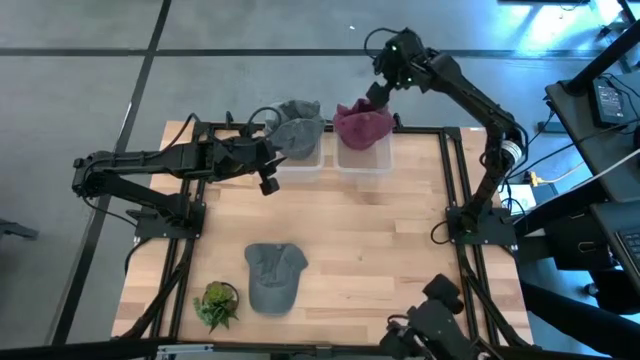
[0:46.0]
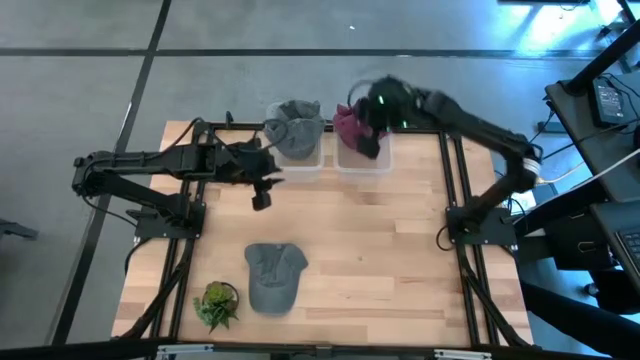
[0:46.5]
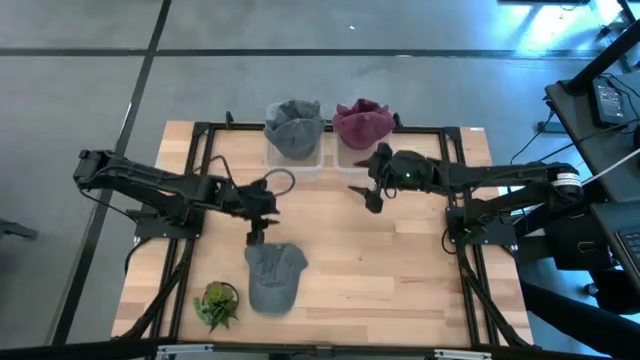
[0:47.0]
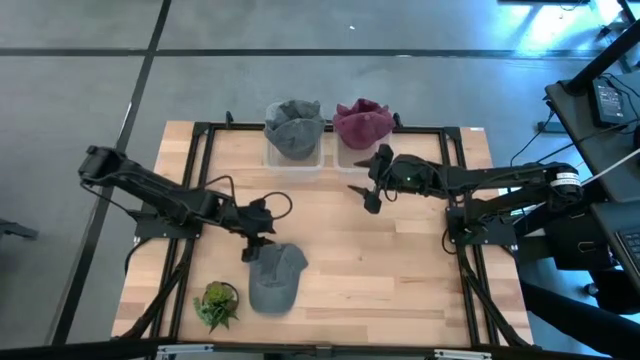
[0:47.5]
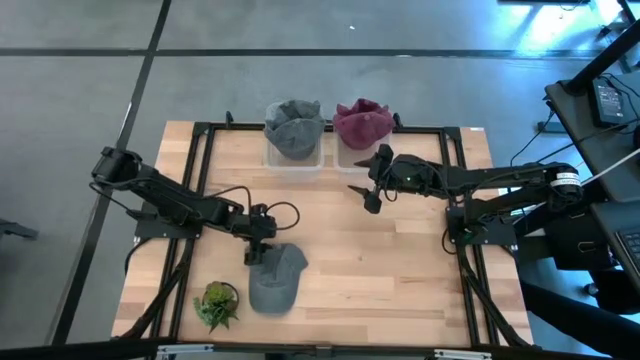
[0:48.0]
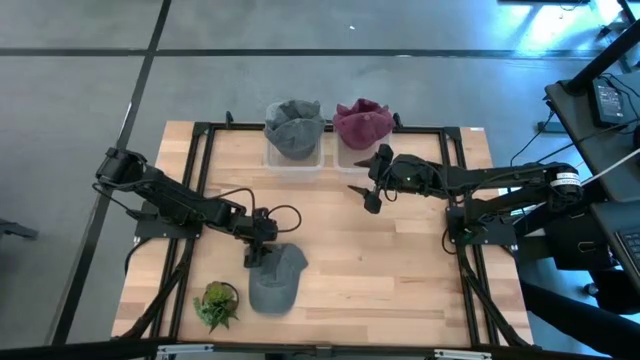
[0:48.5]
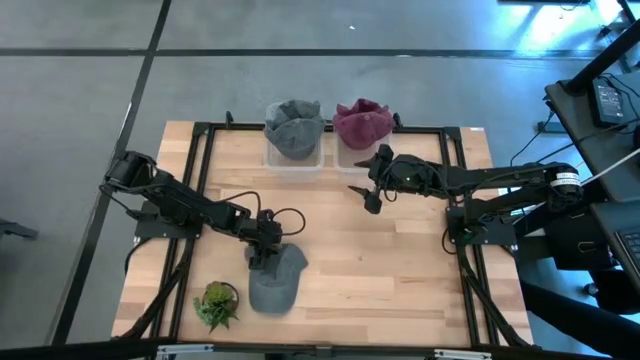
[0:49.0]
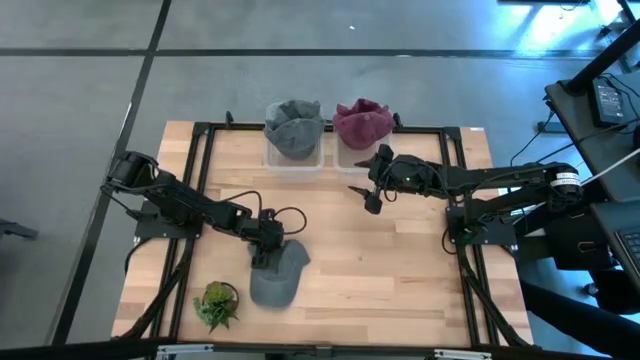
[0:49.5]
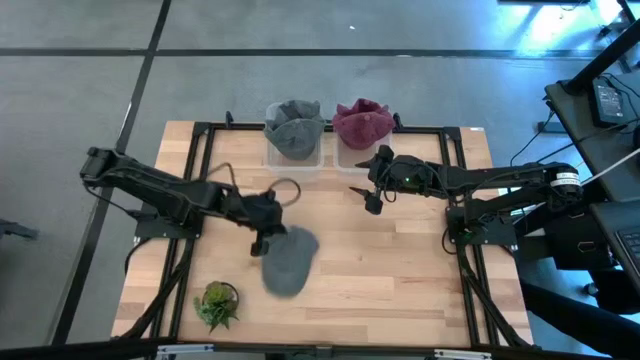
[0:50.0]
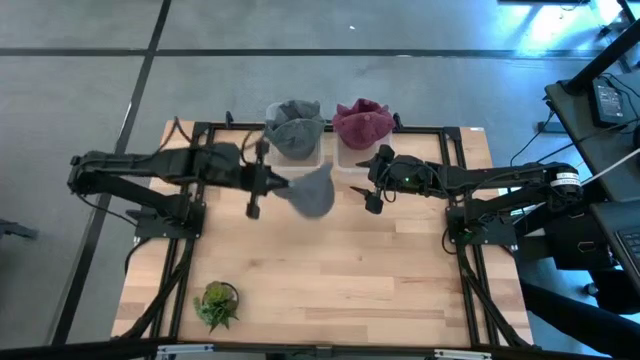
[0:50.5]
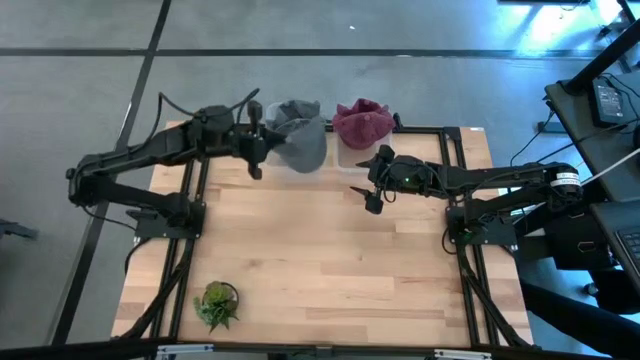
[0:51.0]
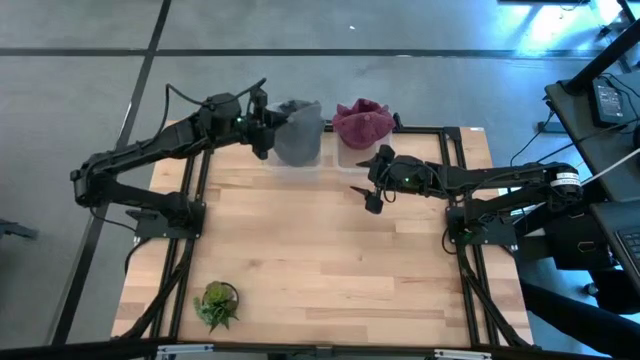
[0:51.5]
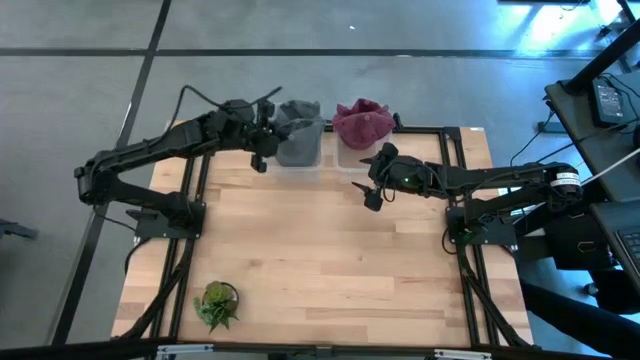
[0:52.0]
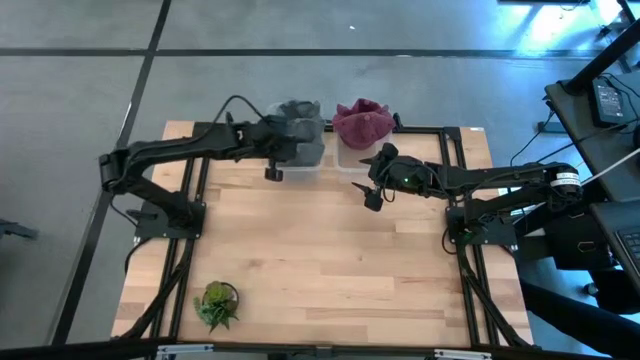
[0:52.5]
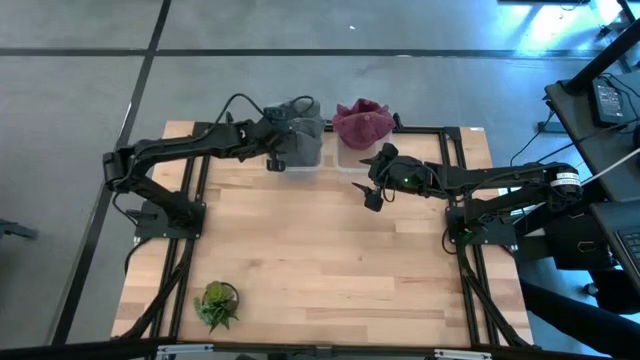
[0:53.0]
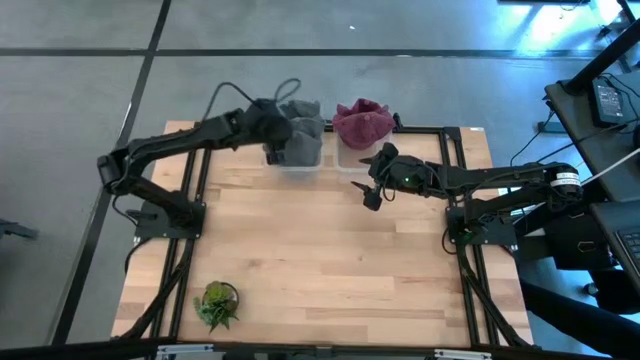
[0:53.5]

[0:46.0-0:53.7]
Task: Pick & Place hat
Put the gray cap into the left transparent bin

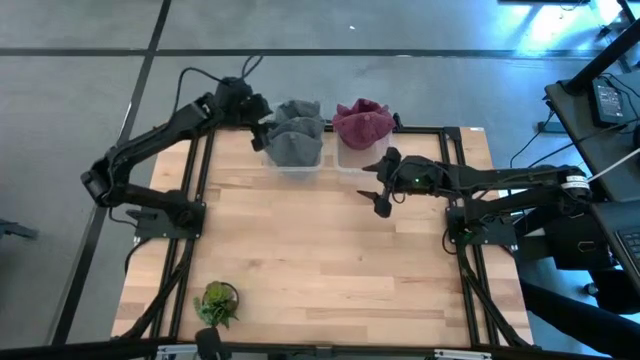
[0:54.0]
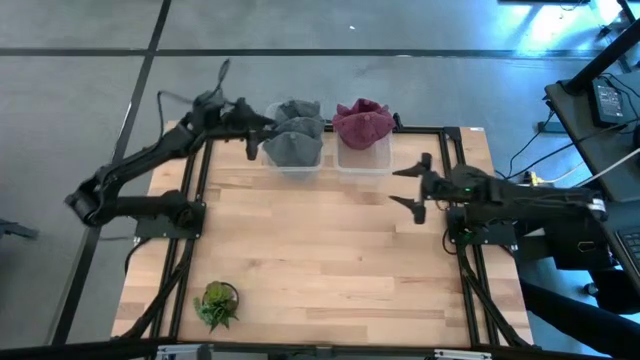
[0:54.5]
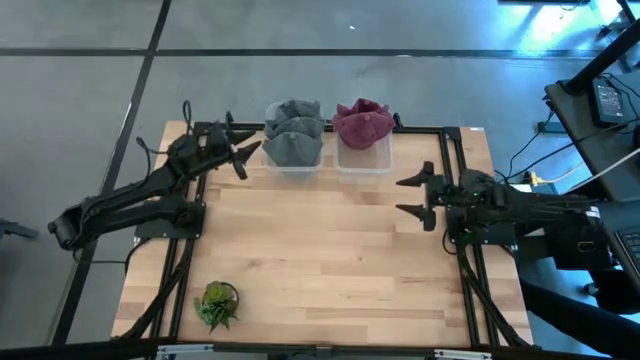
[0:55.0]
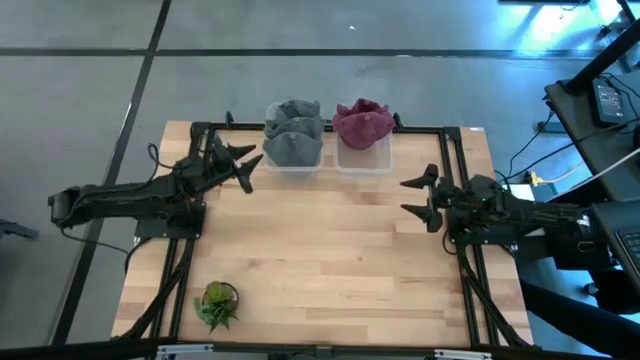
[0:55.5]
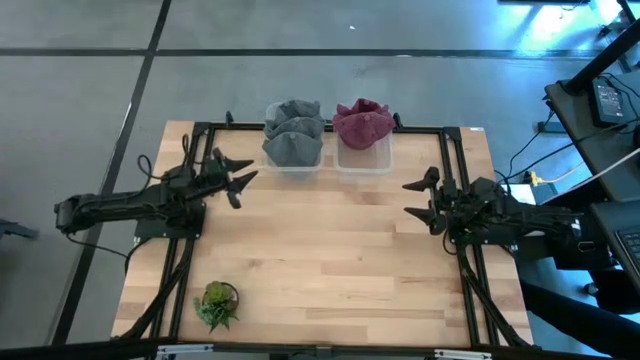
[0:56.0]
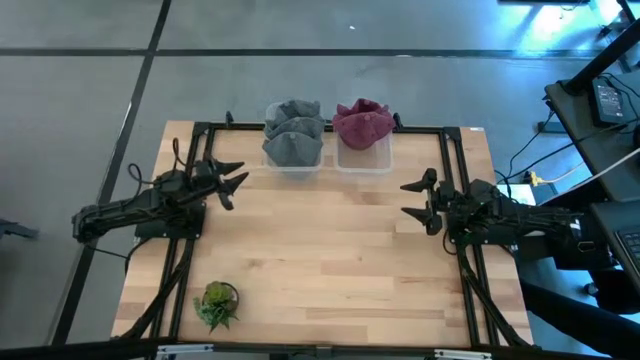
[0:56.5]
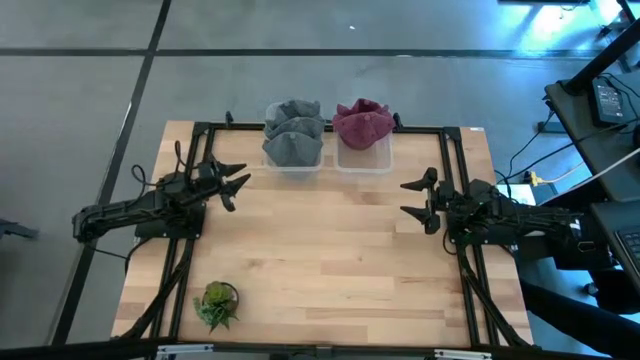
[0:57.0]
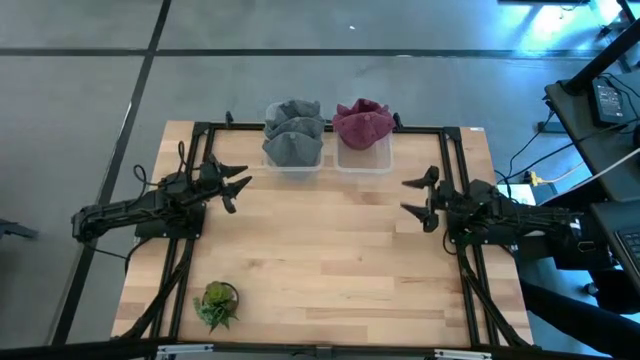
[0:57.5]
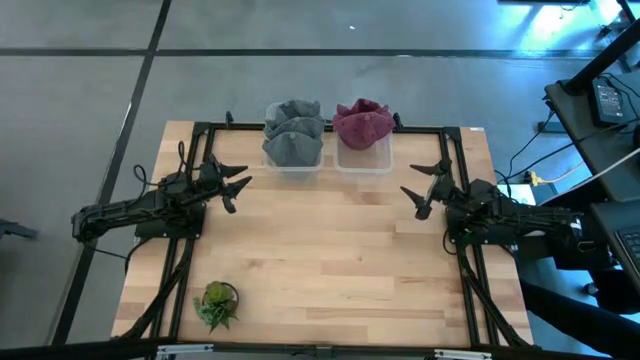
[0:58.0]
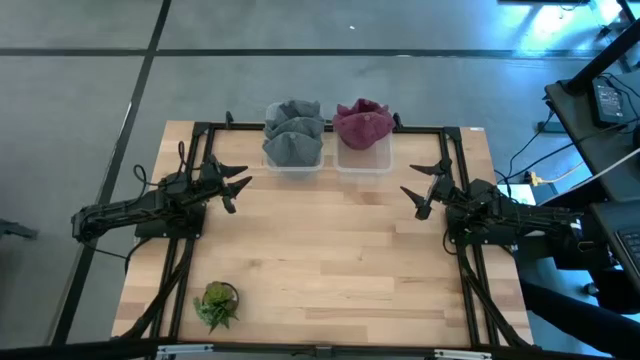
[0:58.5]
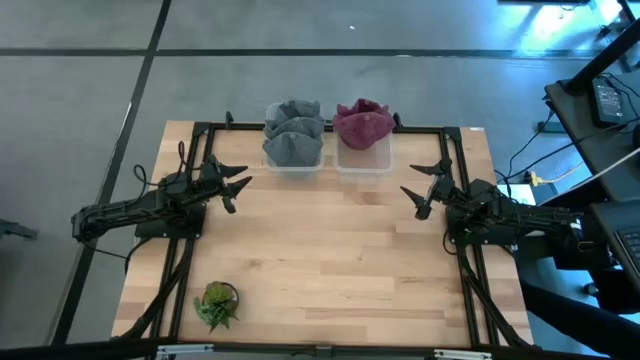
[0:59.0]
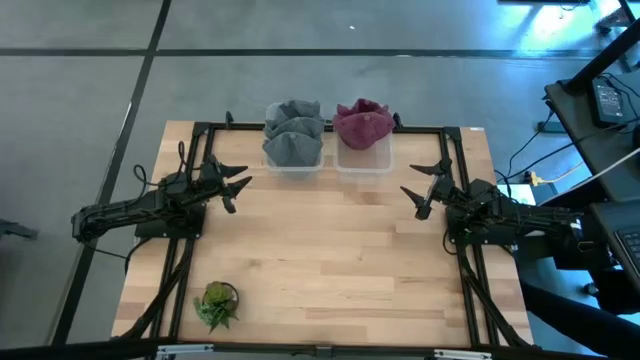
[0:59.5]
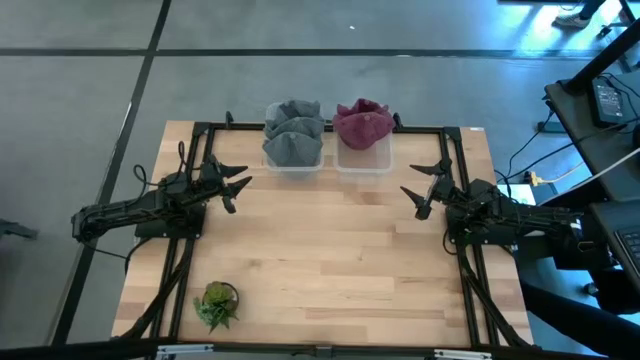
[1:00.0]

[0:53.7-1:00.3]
Return to Home Position

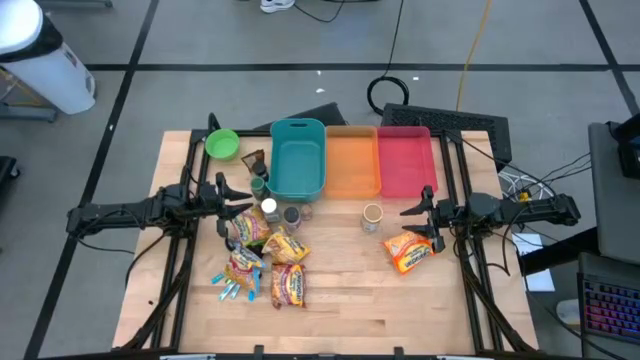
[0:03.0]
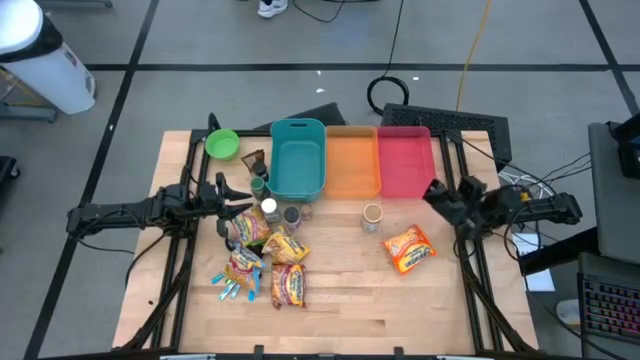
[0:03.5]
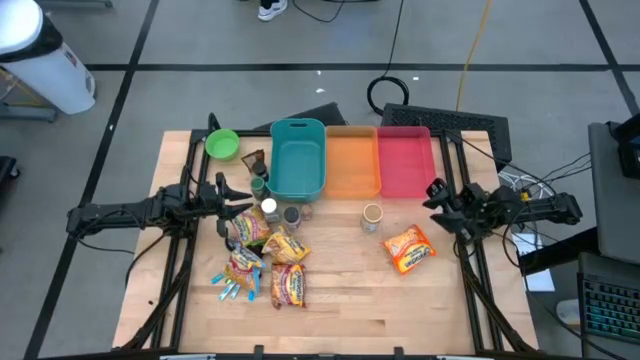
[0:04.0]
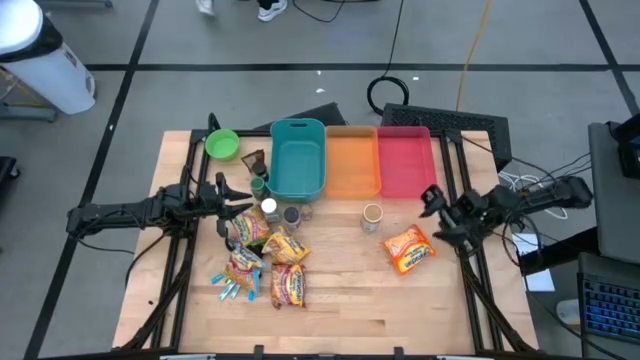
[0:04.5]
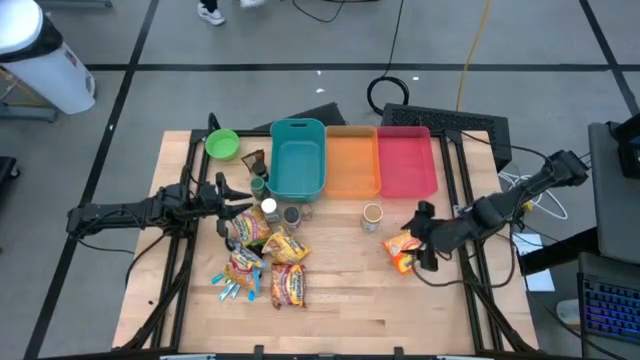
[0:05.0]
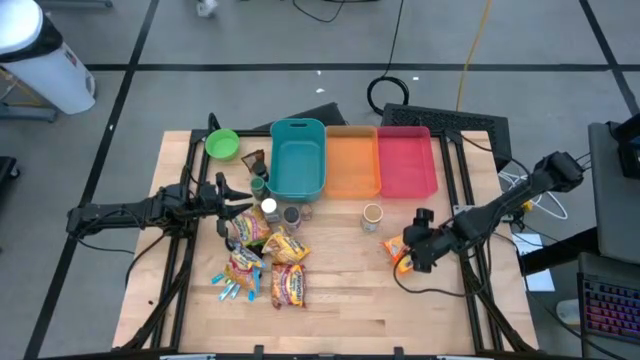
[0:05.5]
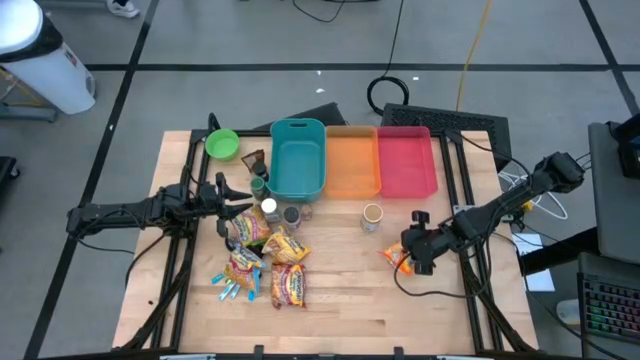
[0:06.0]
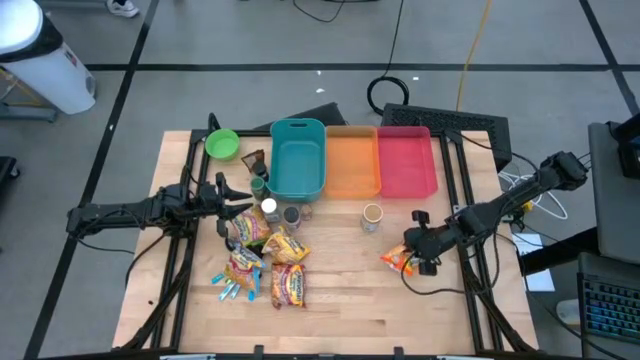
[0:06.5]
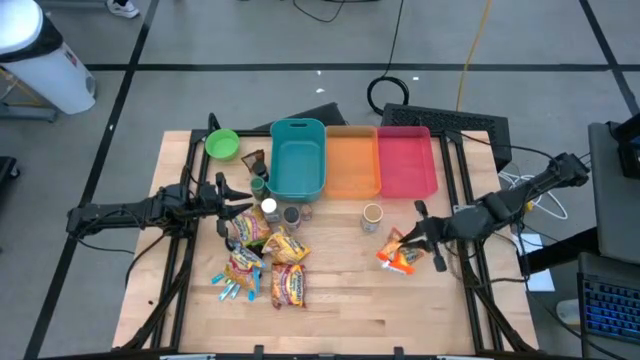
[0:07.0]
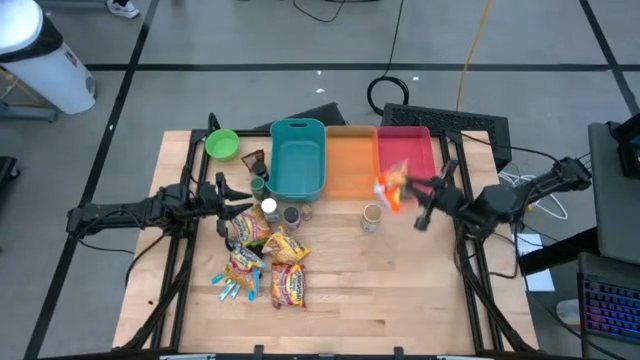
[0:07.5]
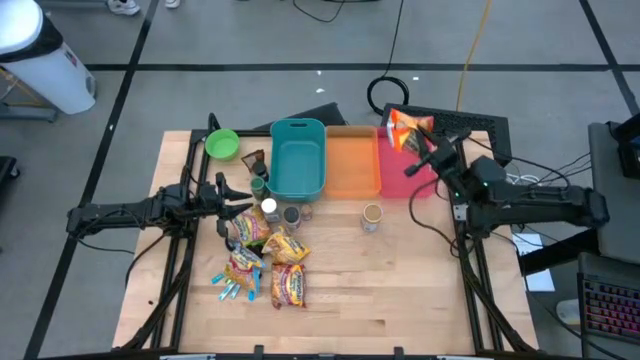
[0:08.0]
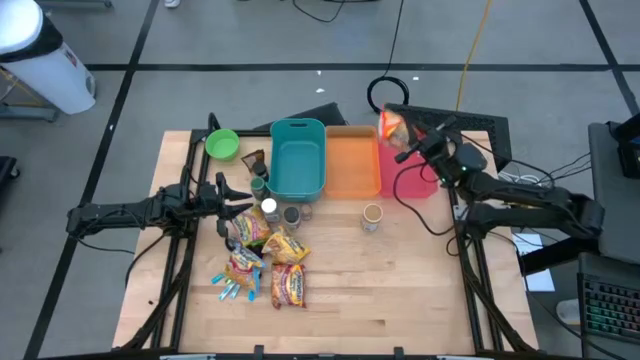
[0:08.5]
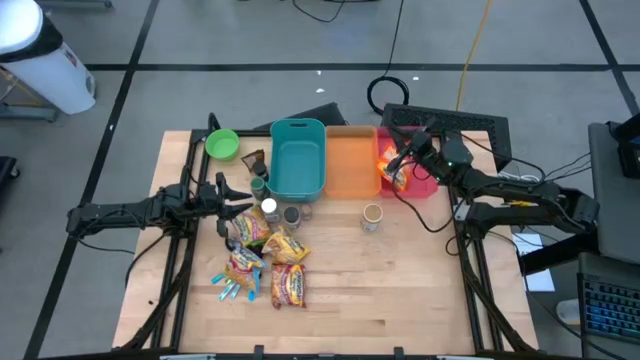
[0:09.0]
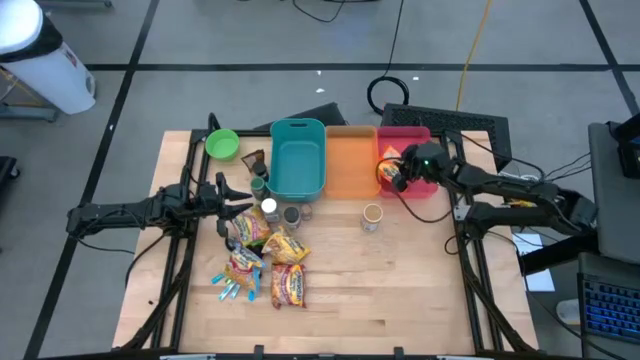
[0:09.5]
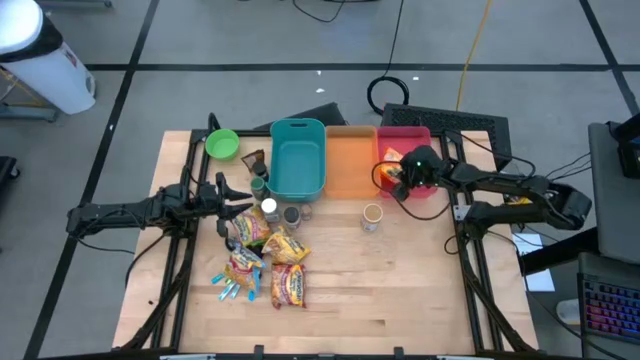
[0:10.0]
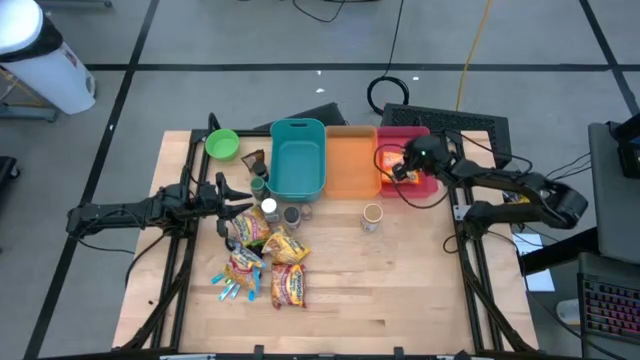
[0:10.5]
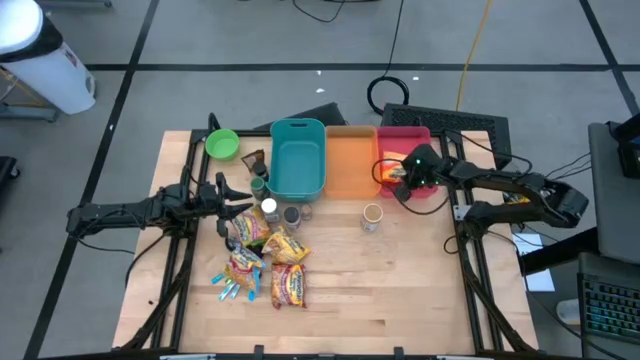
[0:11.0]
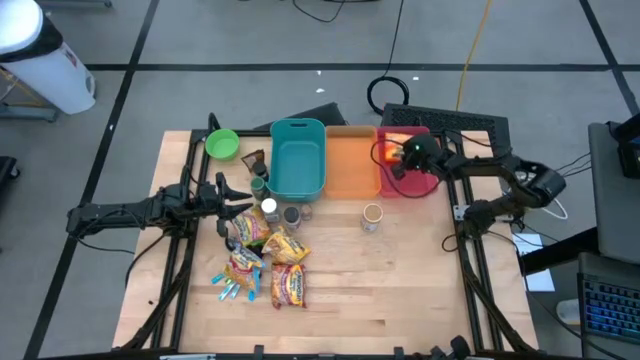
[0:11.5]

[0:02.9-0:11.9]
Task: Pick & Place Food Item
Put the orange noodle pack into the red bin
